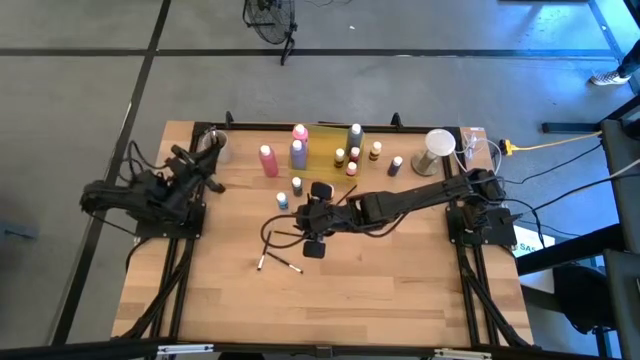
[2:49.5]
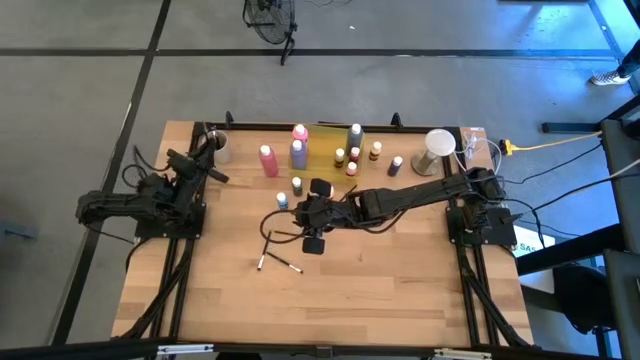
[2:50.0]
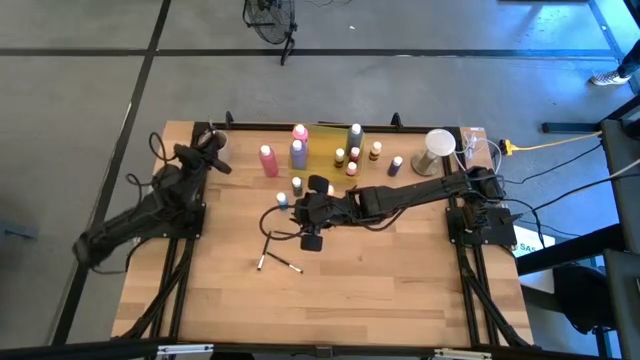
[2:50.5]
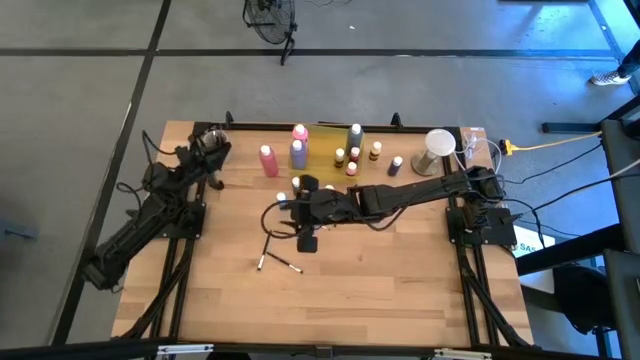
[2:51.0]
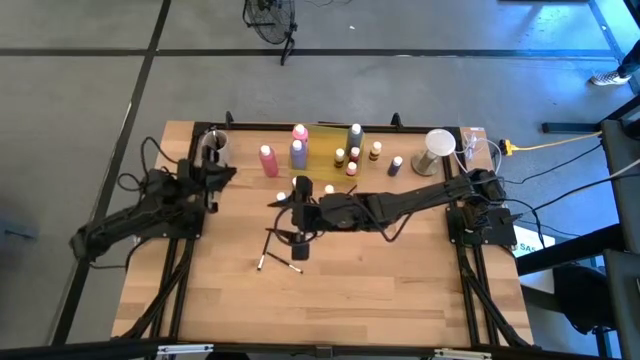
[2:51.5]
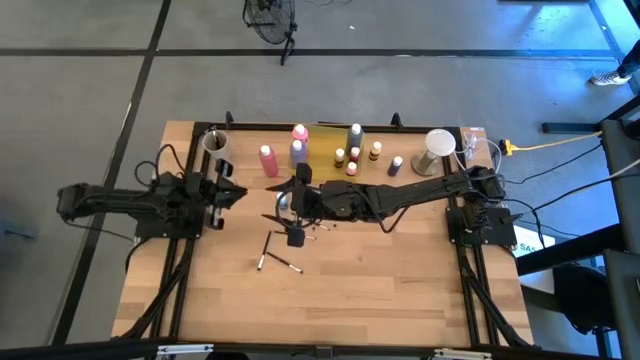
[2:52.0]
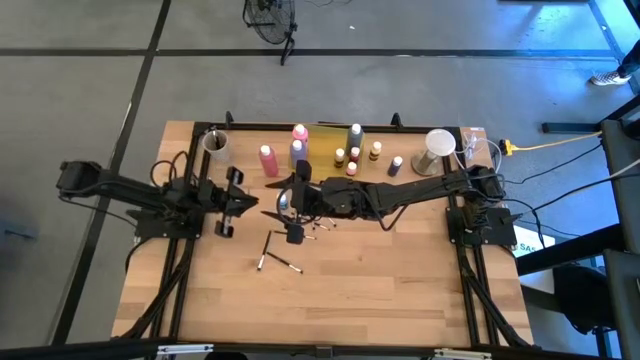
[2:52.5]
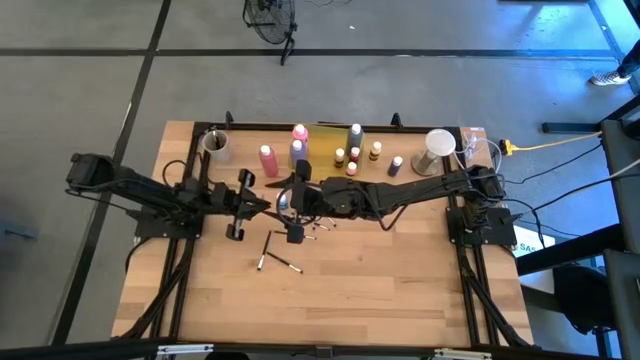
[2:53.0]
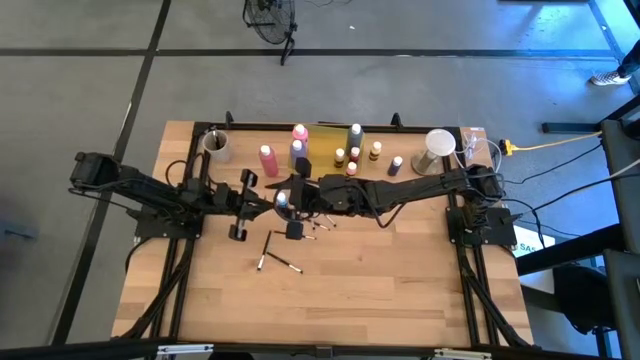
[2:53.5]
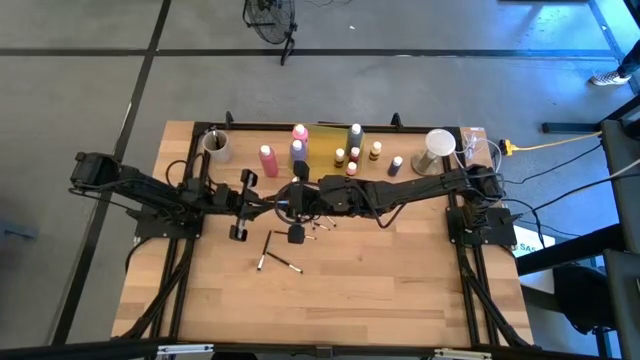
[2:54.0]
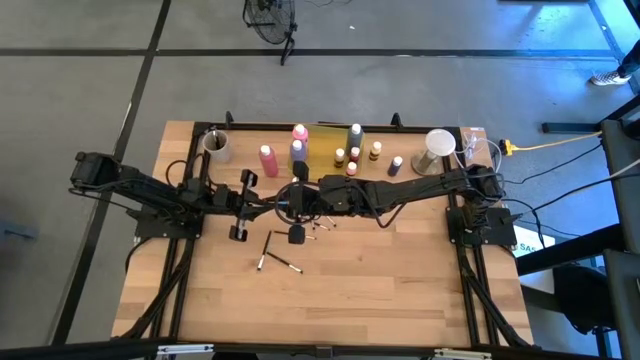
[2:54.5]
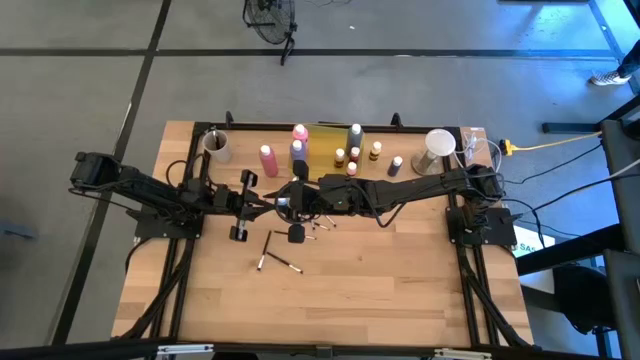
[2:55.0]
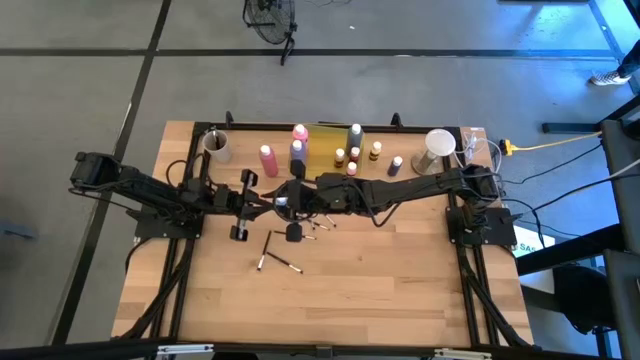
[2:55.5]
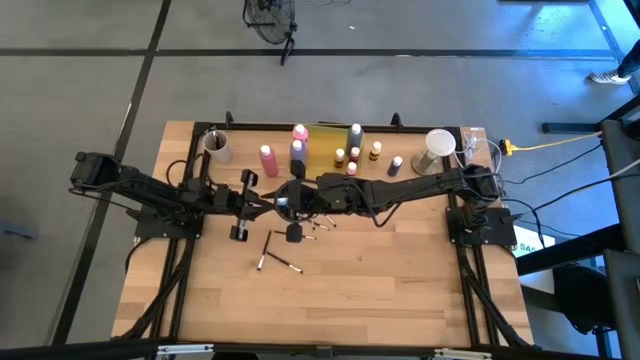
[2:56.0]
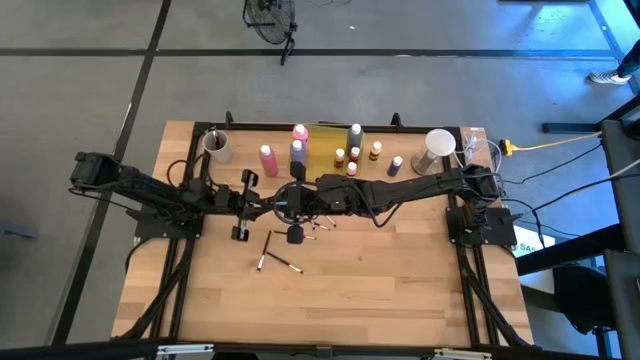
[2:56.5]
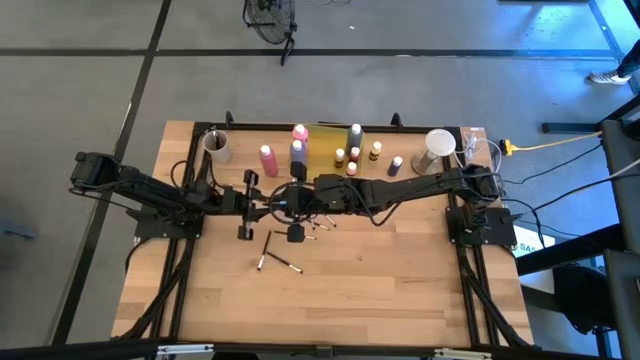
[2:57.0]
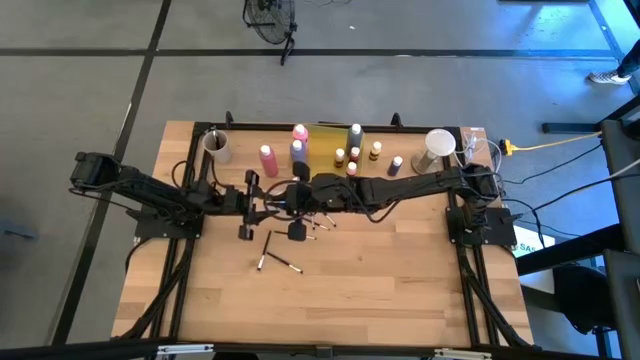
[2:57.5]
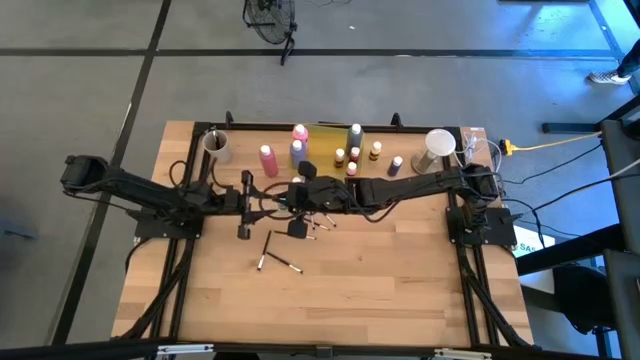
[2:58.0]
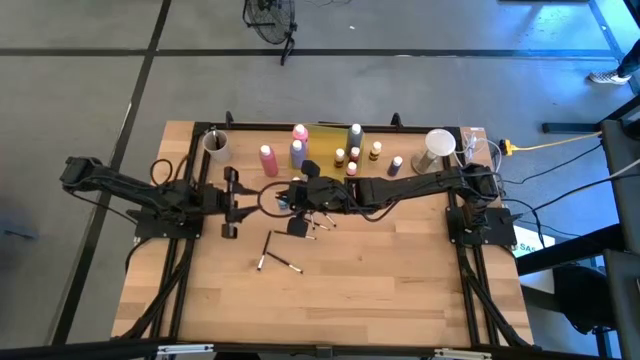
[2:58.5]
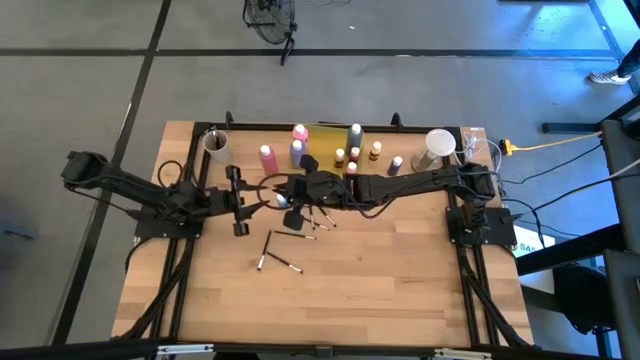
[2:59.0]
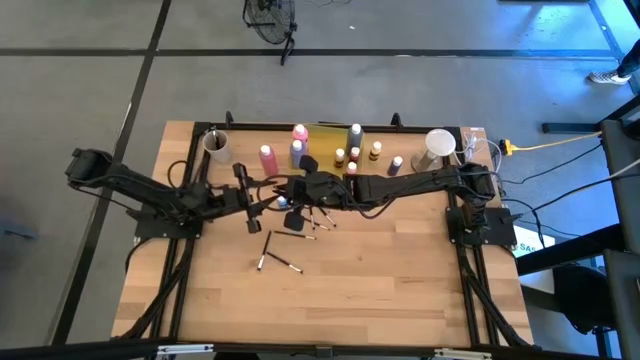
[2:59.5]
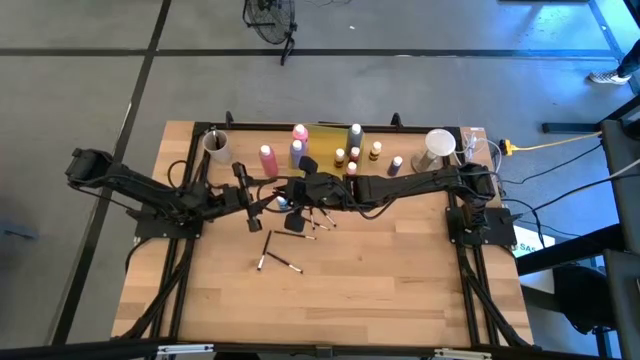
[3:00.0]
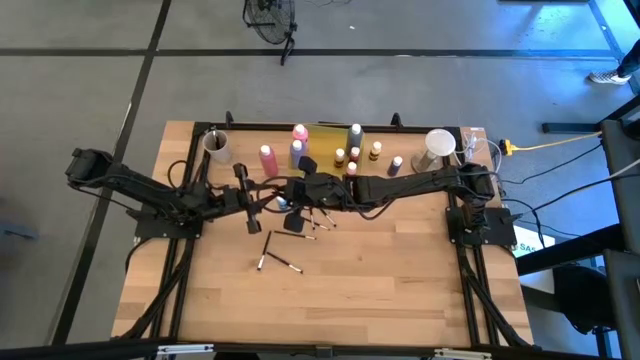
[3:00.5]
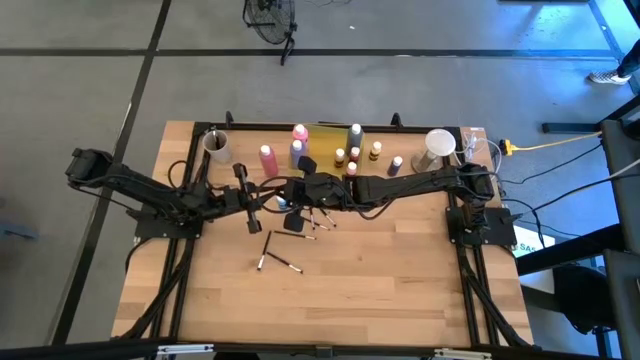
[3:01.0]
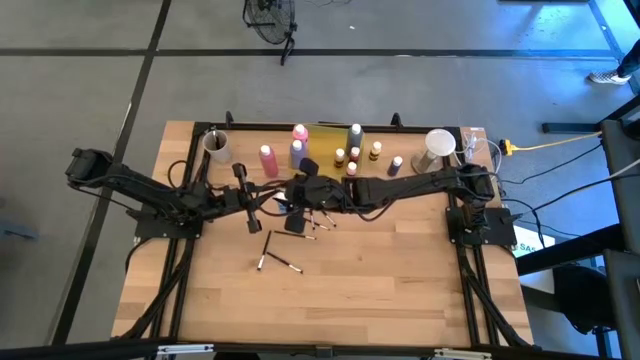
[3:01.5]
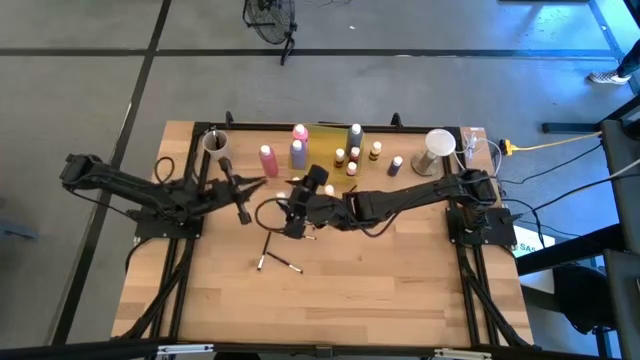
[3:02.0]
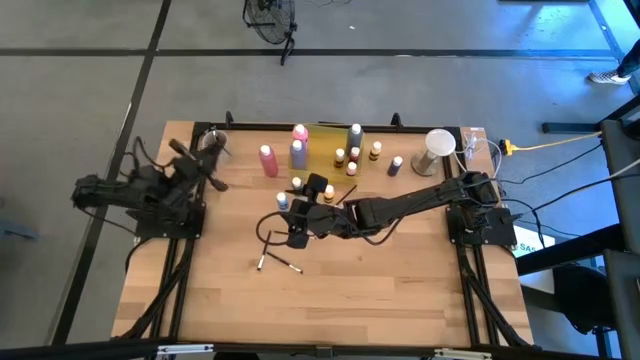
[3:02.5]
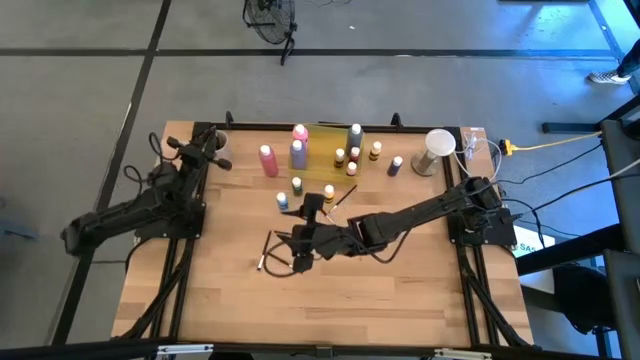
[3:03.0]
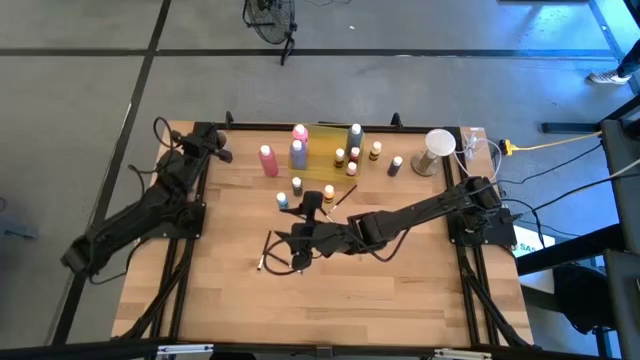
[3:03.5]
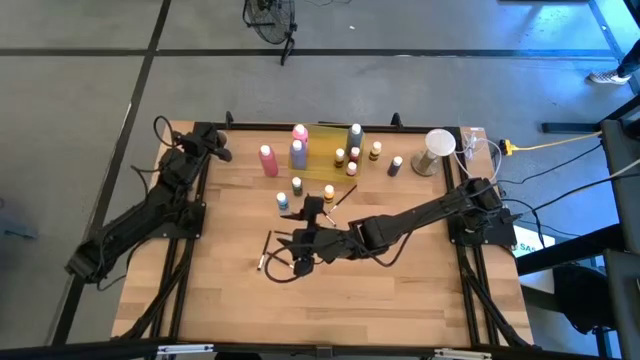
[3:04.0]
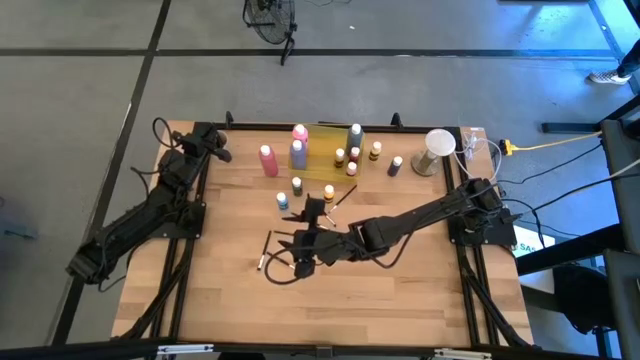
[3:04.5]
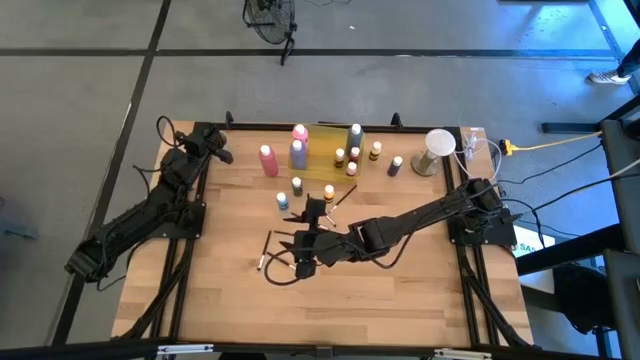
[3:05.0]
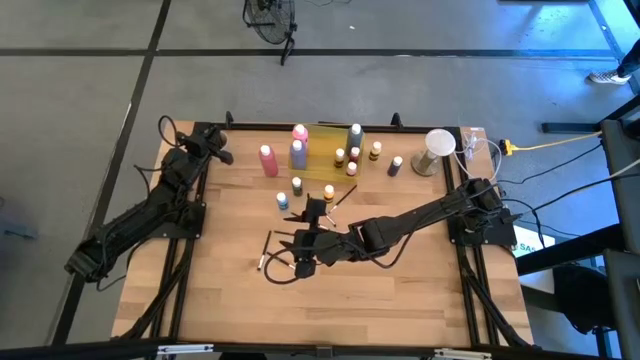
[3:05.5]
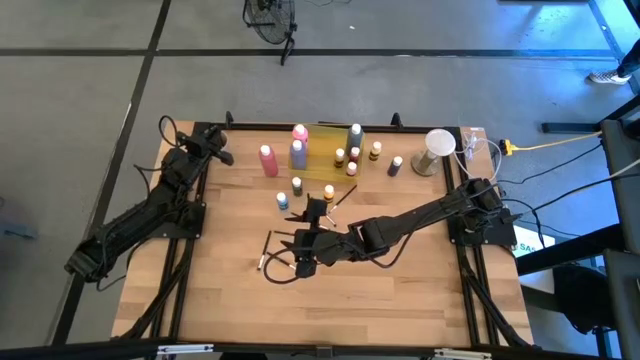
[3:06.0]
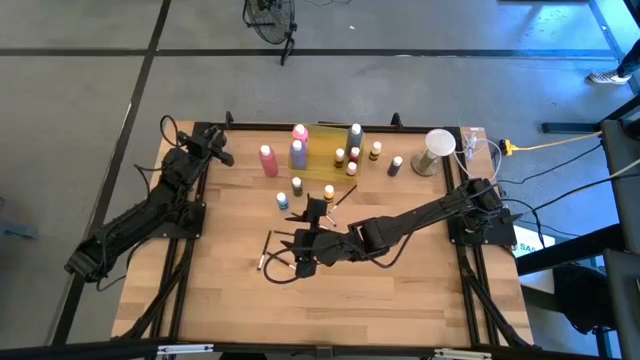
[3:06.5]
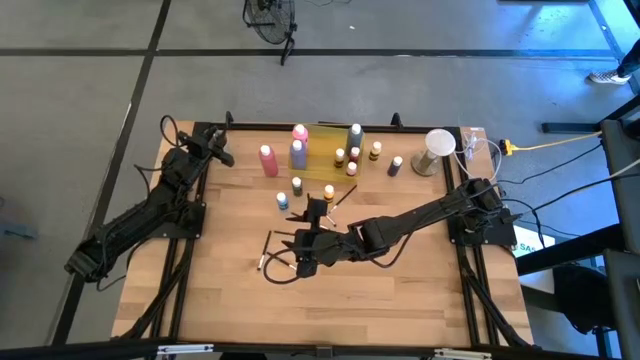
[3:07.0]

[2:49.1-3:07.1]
Task: Pick & Place Paint Supplies
Put the silver paintbrush into the white cup

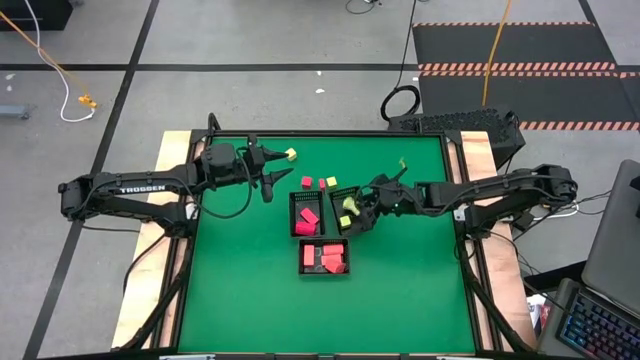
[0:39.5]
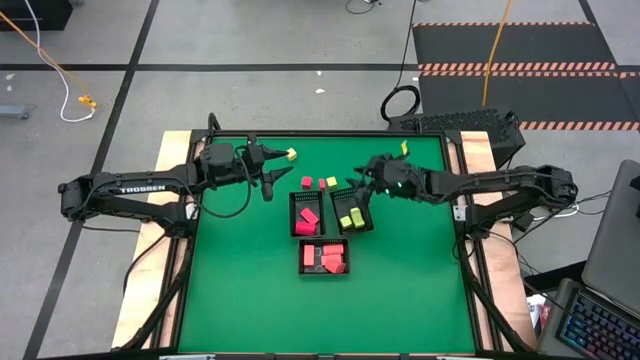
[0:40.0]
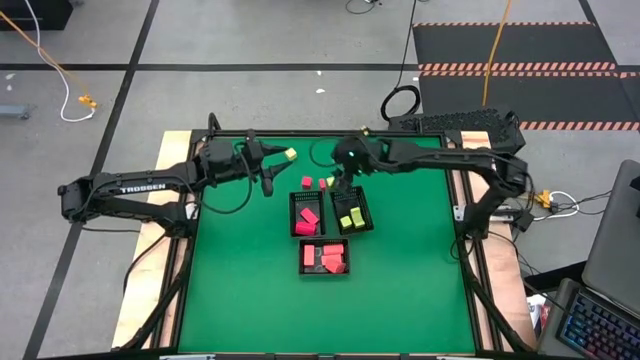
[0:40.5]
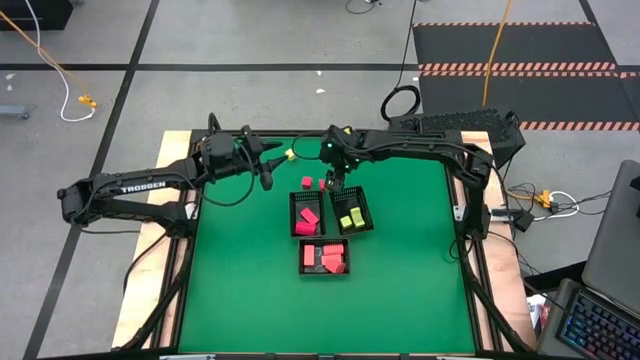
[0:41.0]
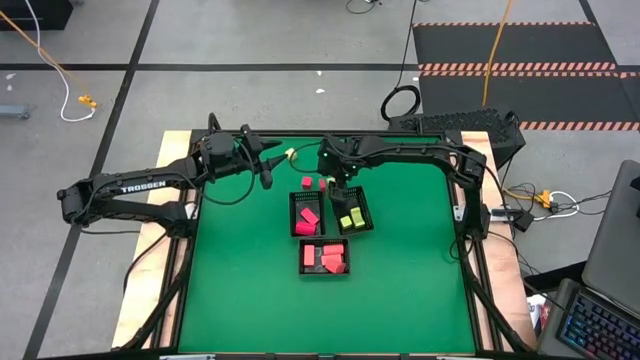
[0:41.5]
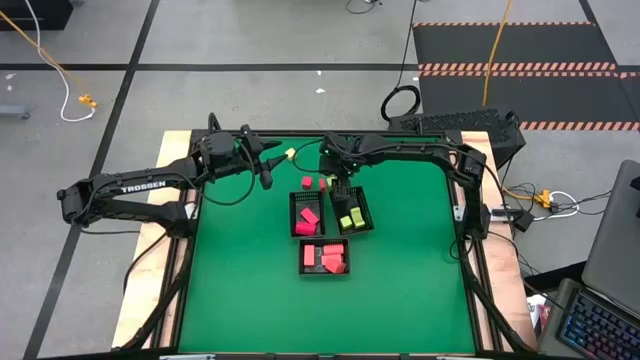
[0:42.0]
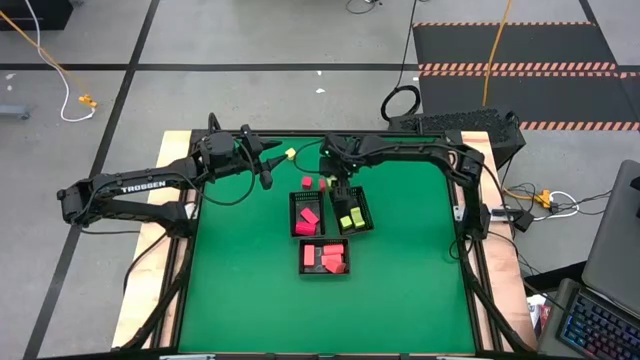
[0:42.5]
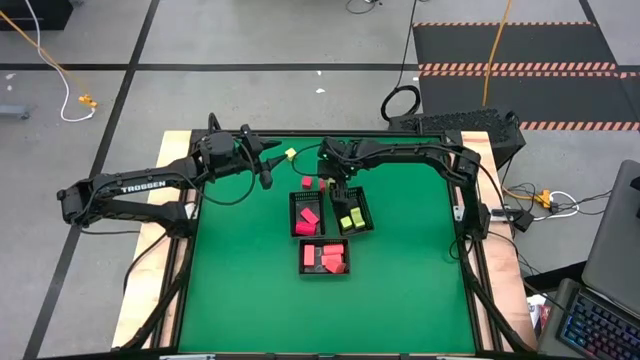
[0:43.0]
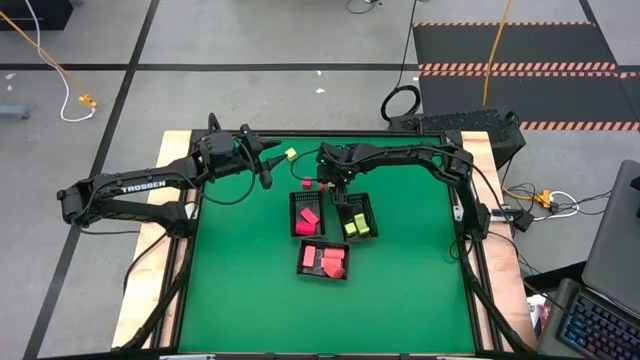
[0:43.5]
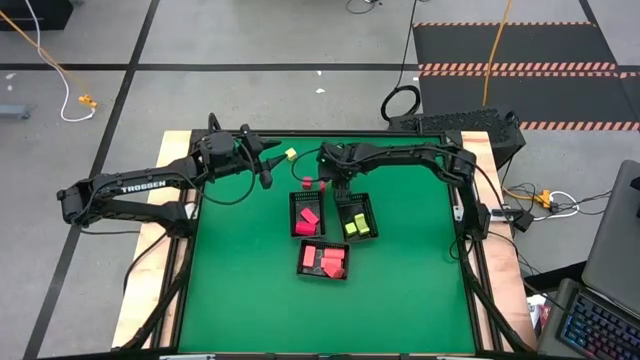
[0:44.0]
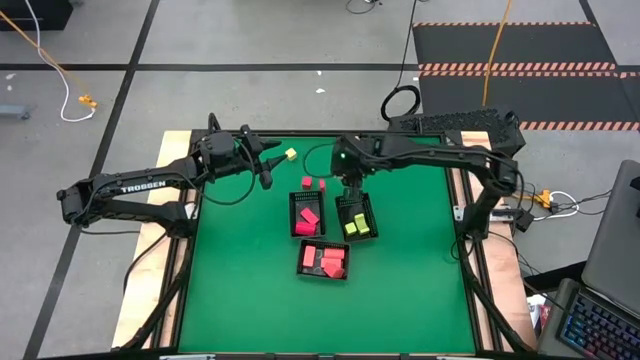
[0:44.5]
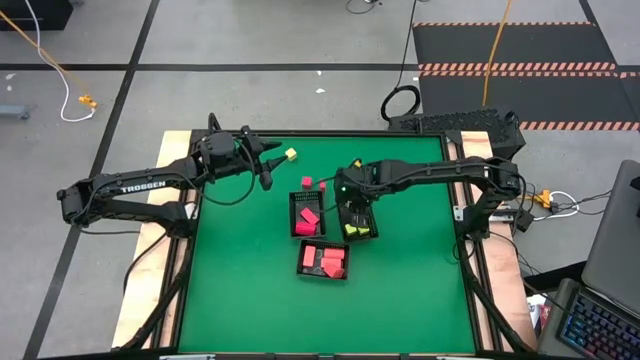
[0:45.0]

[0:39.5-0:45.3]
Task: Sort & place blocks by color
Put the green block into the top right black bin
